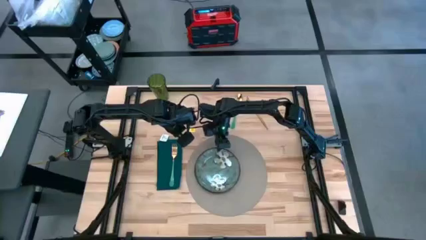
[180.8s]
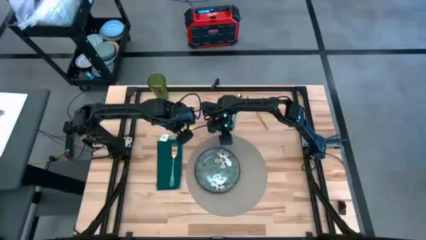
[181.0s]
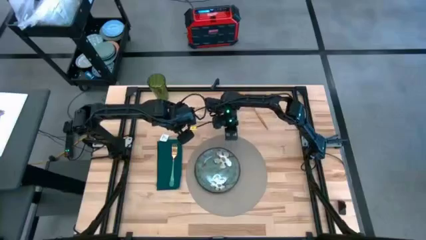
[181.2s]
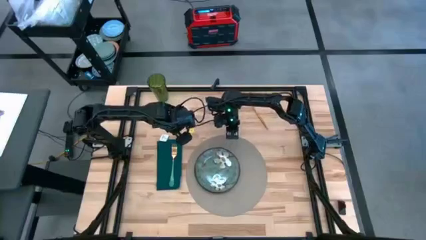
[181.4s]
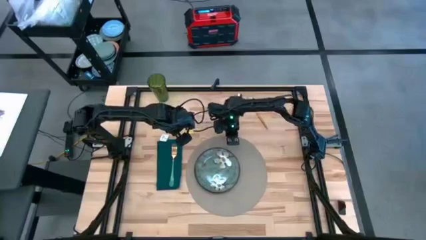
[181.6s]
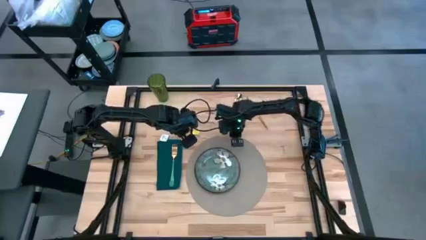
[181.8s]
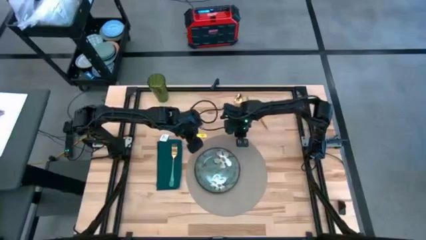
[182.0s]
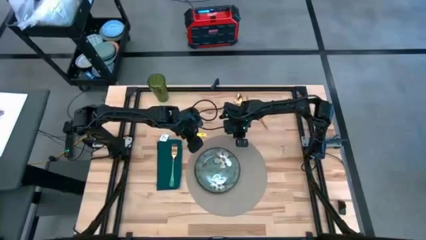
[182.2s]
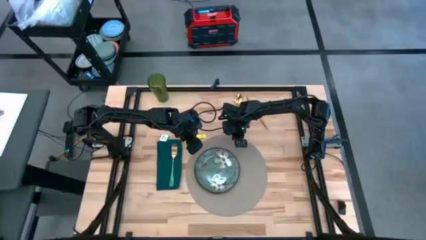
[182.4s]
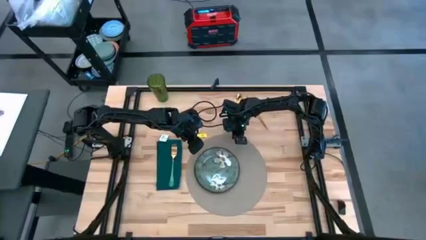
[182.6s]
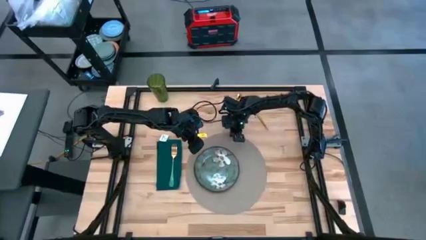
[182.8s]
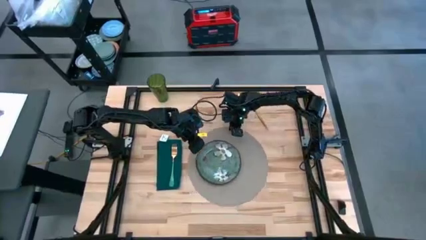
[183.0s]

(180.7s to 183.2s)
Task: Set table place
Adjust the gray table mat

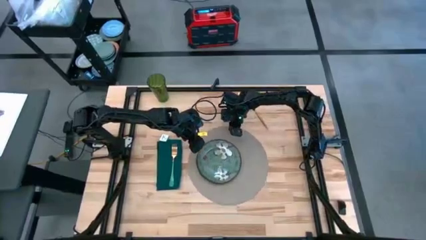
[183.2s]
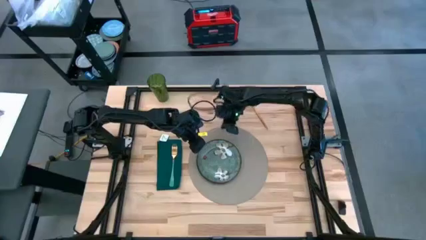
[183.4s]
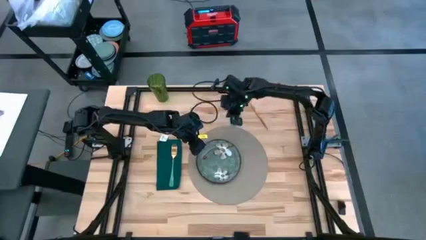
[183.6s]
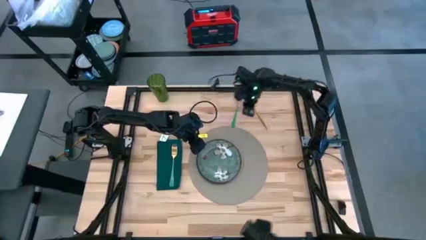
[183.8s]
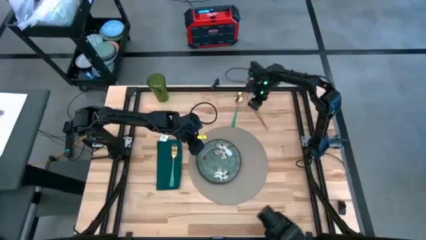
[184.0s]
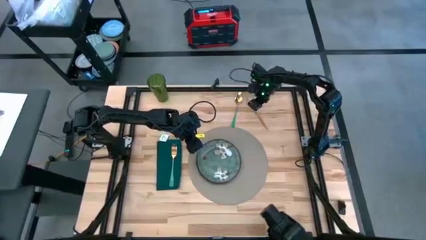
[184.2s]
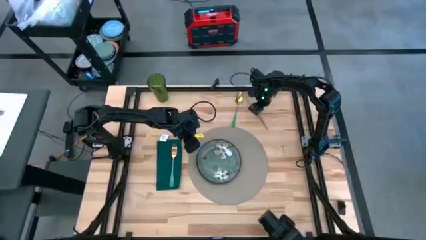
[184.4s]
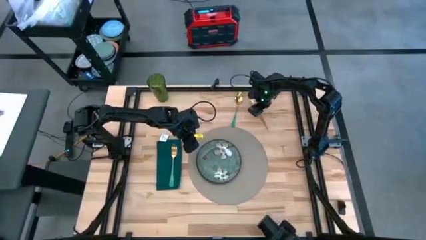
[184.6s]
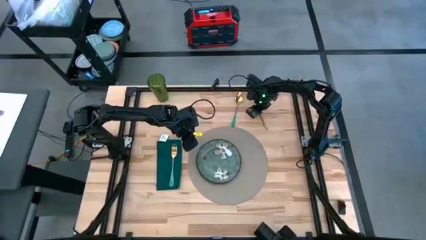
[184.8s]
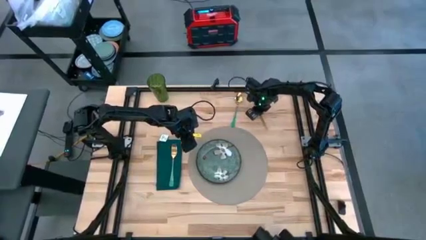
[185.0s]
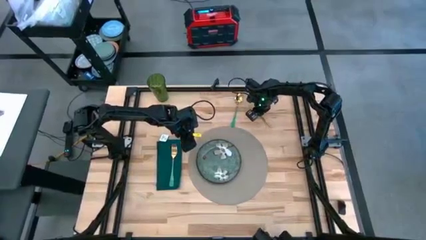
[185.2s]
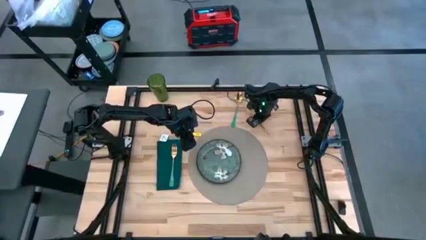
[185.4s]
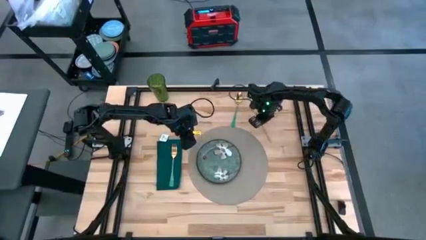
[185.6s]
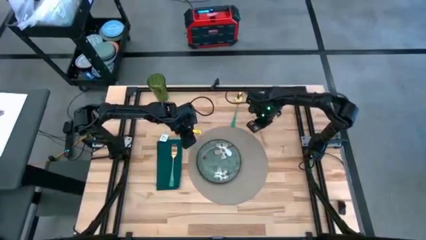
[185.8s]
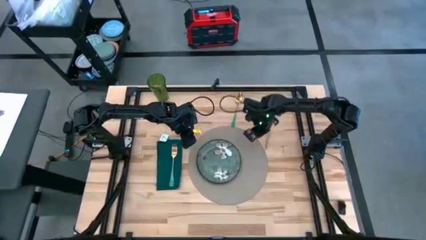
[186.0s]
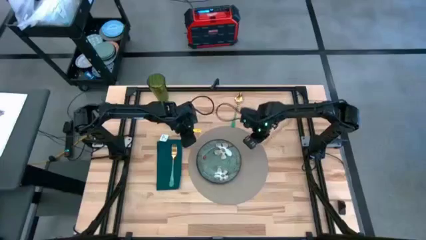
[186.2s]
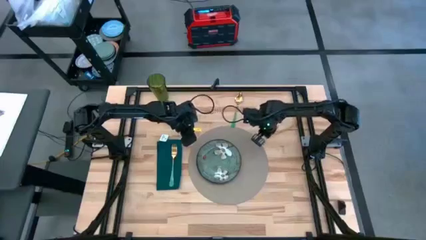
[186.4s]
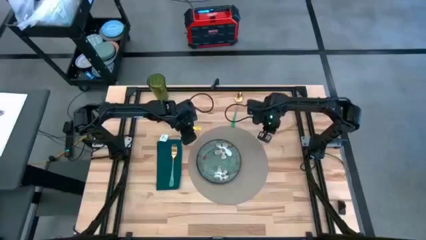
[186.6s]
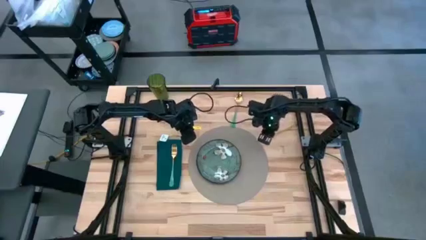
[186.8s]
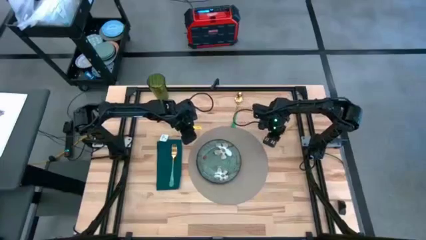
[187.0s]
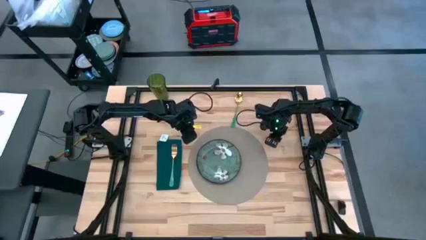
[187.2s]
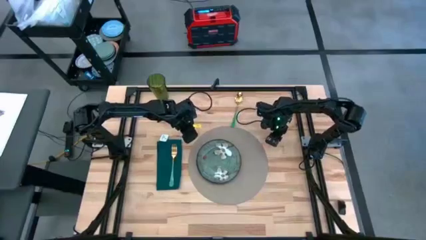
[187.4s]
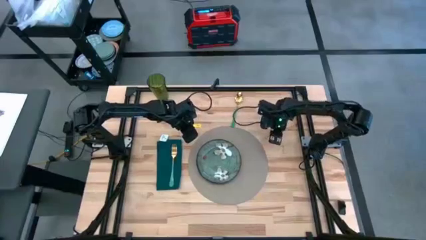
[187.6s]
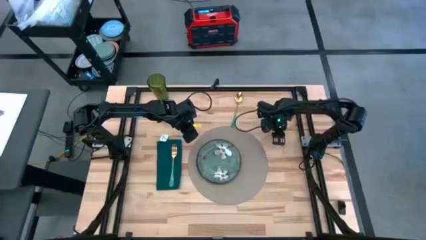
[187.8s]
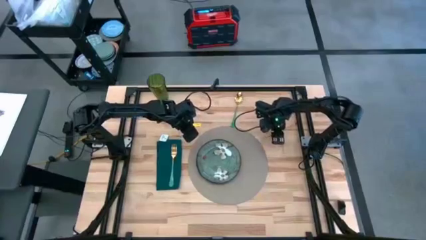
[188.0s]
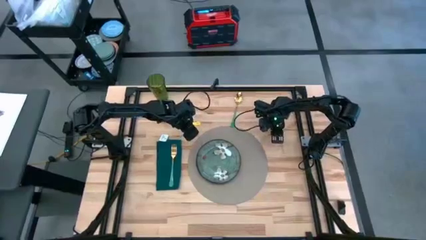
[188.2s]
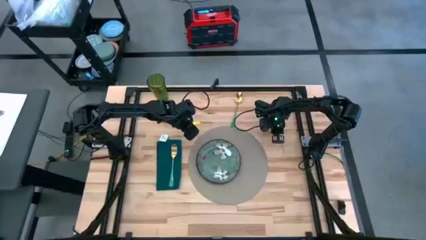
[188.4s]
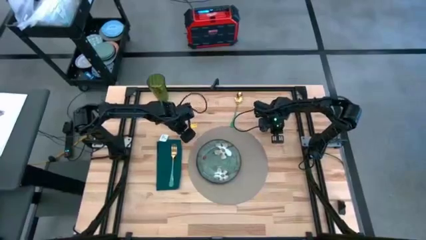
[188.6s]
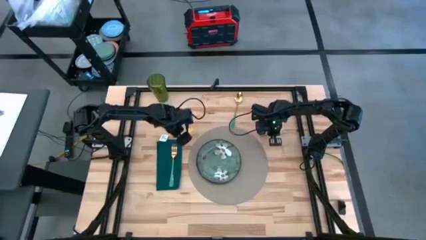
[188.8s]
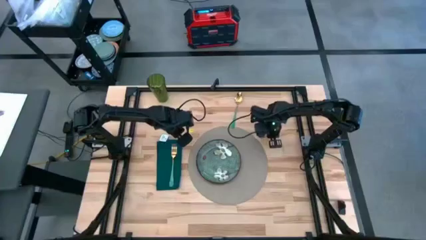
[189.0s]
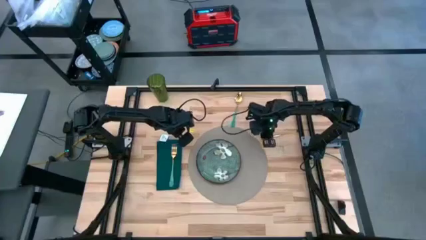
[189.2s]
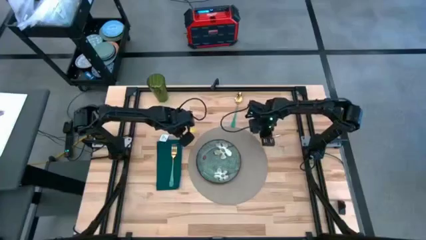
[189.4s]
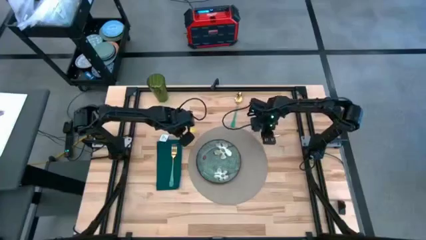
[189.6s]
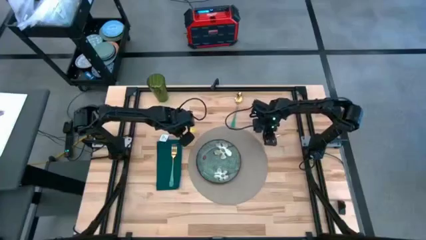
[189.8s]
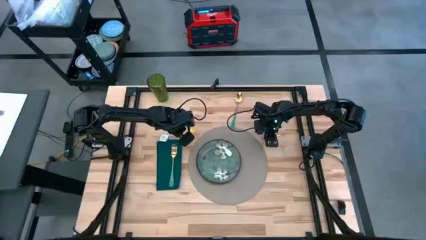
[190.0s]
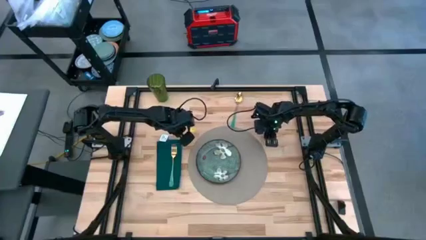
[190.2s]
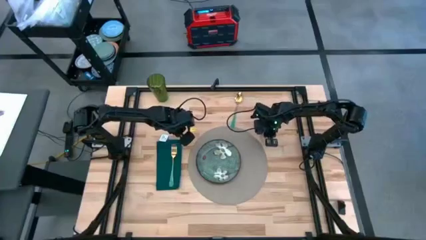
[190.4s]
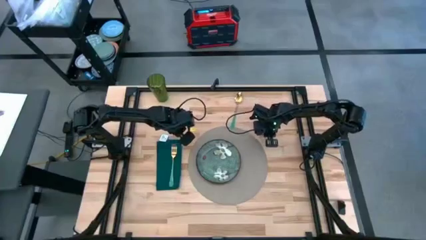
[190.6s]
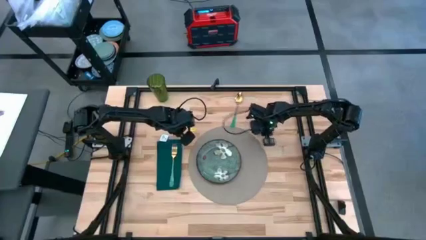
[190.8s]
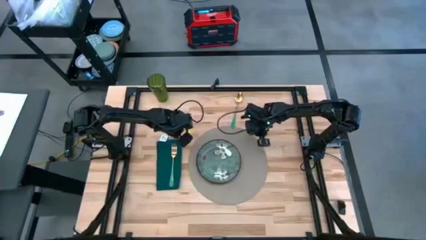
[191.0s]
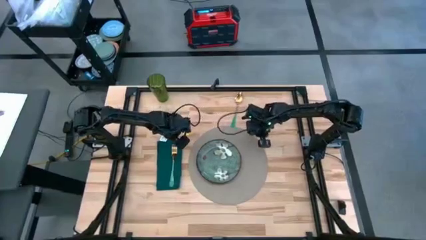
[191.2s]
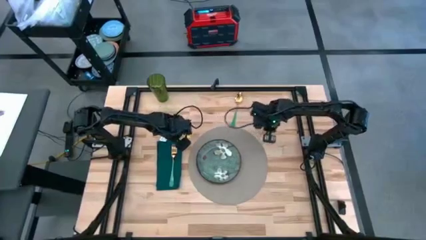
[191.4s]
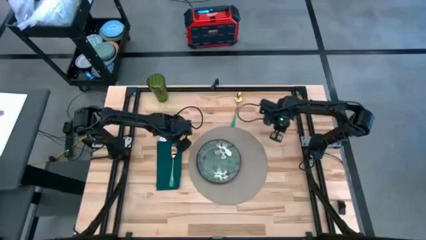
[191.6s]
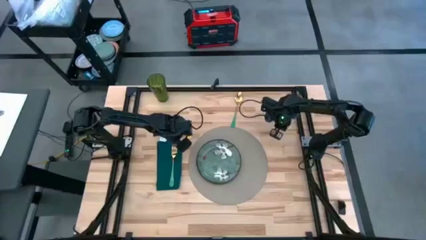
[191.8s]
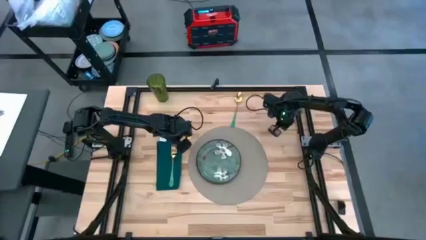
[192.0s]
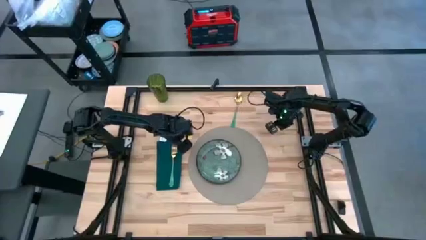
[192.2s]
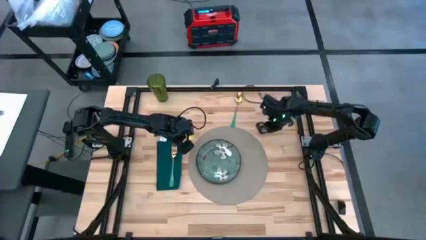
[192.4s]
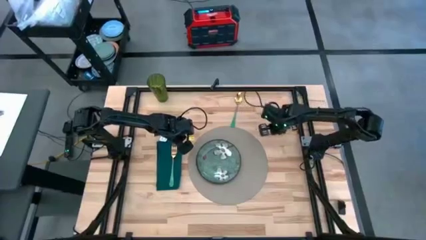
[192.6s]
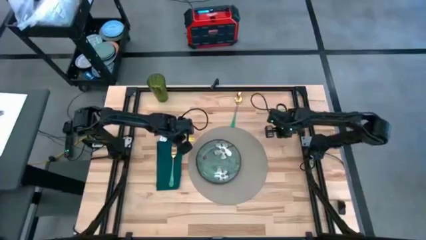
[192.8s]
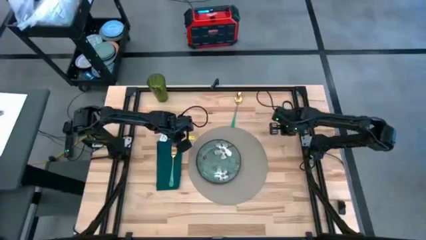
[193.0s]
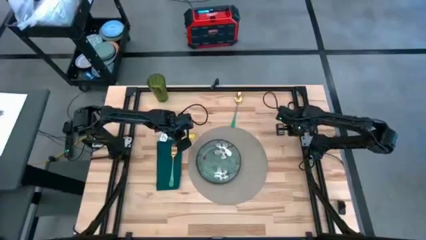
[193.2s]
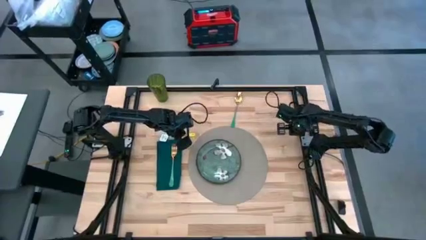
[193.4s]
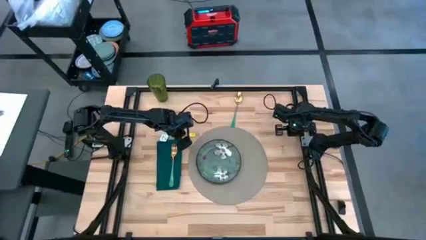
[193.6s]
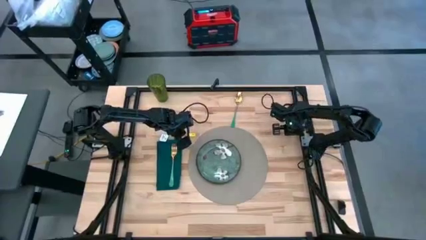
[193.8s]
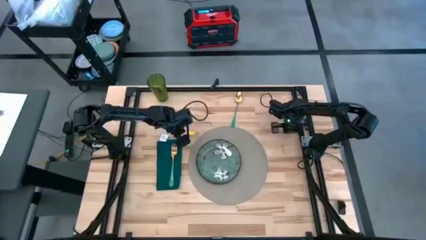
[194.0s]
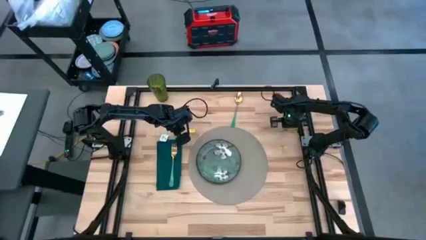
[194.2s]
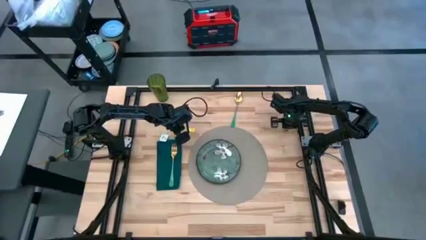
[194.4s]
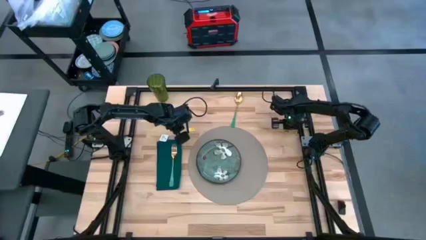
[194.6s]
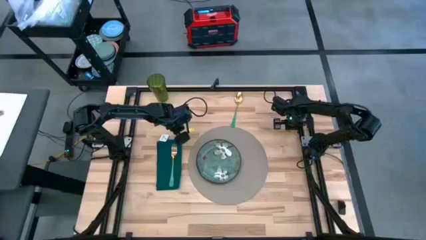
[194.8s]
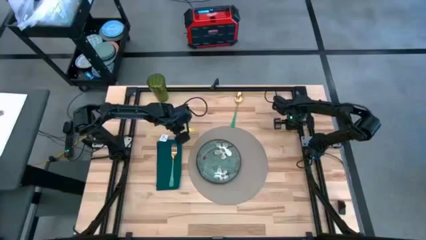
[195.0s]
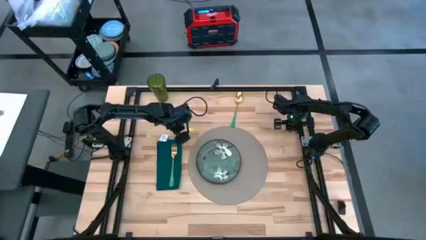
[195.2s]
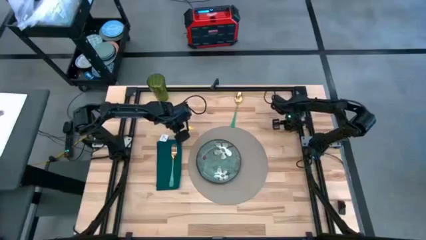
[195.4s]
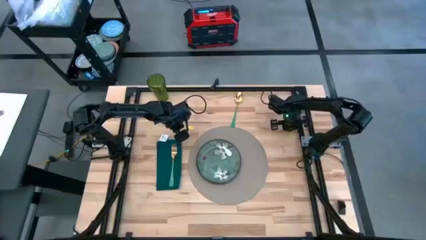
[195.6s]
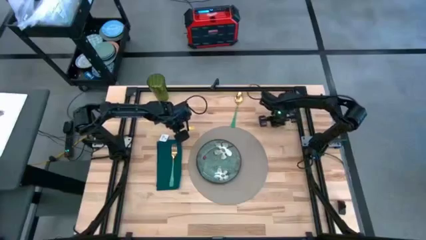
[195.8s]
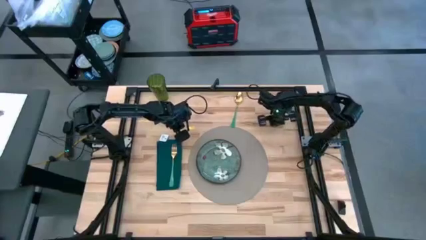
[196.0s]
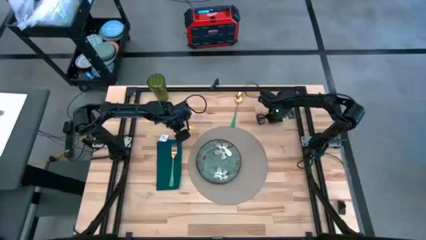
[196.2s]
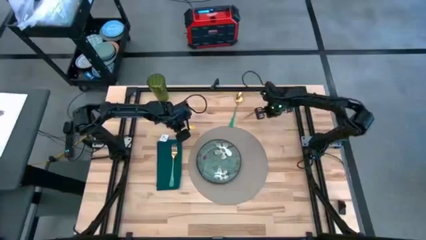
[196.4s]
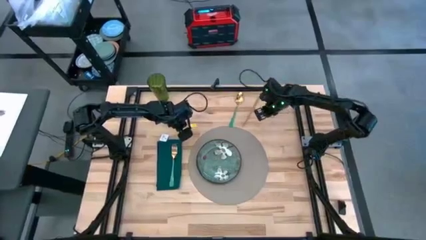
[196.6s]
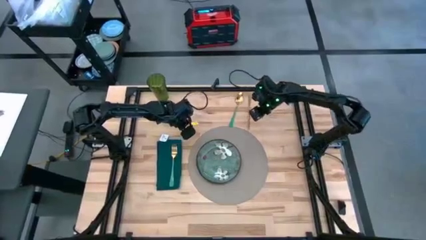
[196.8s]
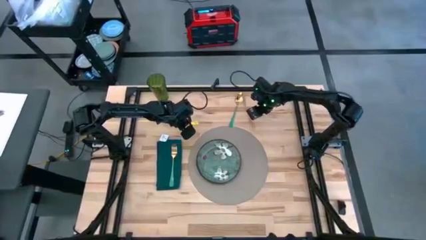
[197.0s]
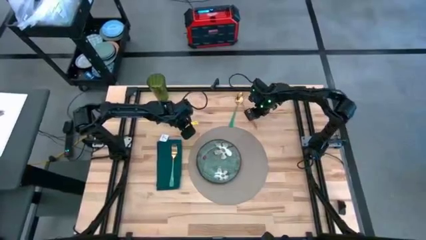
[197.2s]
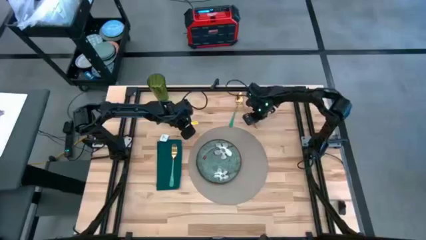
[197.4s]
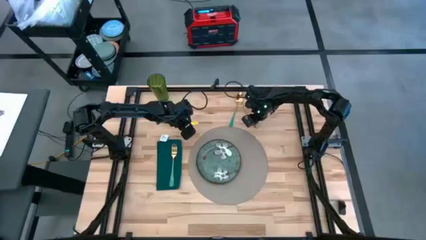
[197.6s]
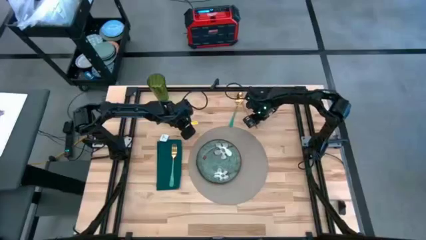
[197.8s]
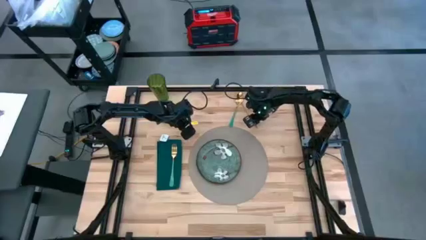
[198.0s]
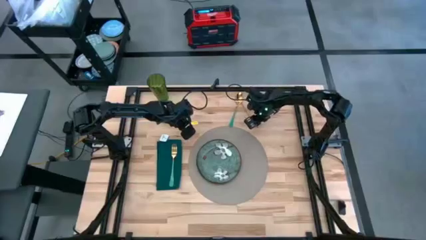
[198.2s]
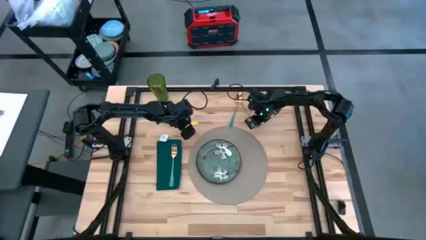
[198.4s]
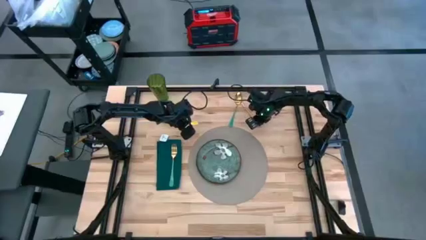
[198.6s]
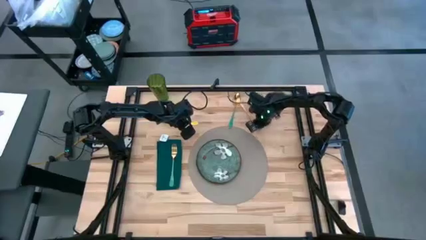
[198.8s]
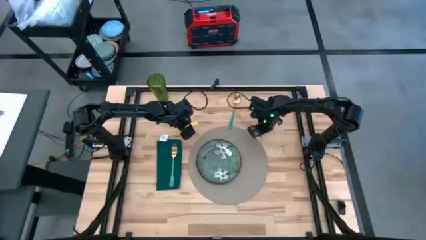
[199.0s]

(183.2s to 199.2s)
Put the golden knife on the gray table mat

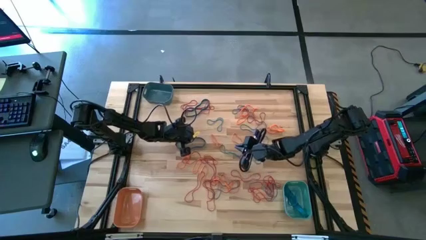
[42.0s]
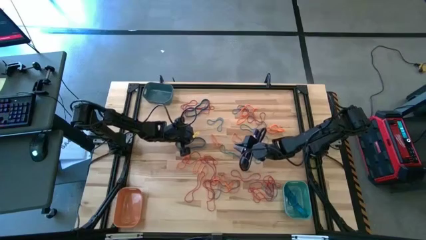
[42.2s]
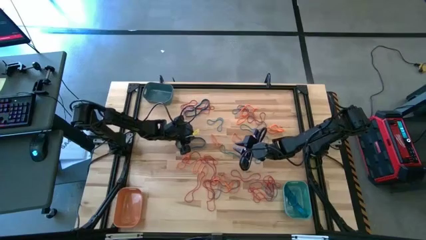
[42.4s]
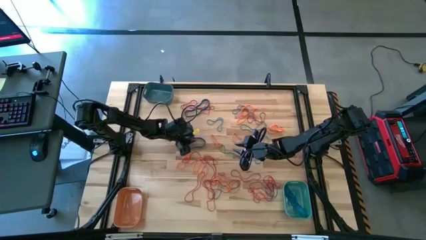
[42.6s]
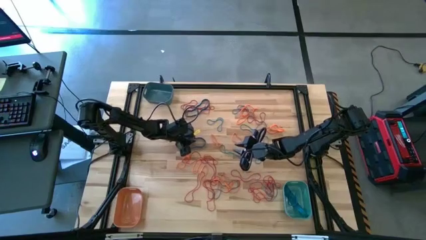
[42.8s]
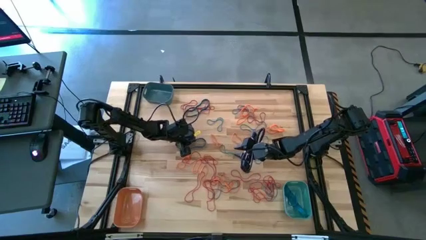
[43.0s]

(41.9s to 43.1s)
Task: Sort rubber bands into baskets
Put the blue rubber band into the light blue bin
